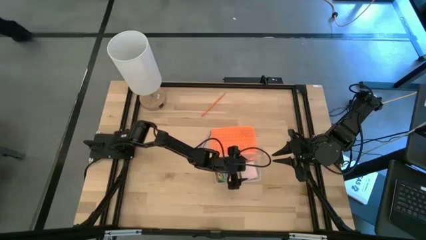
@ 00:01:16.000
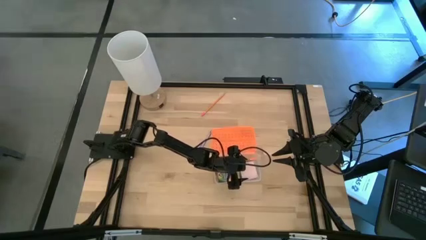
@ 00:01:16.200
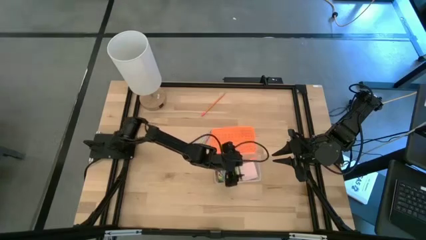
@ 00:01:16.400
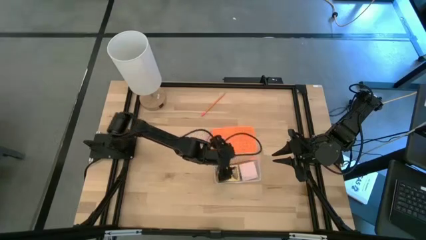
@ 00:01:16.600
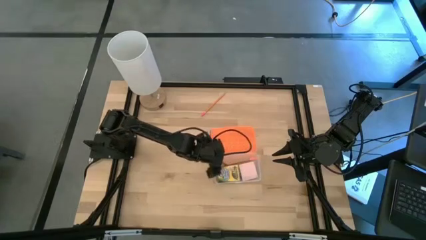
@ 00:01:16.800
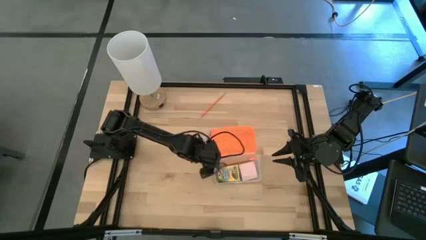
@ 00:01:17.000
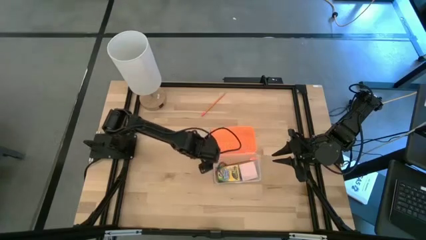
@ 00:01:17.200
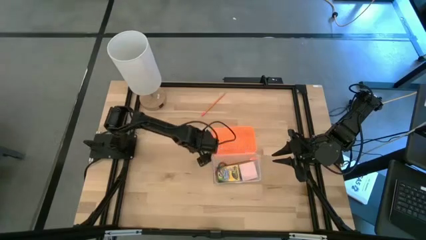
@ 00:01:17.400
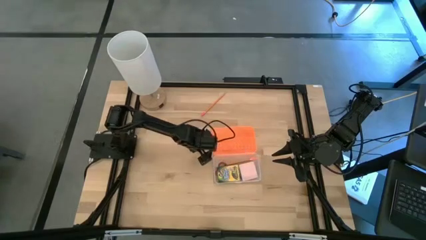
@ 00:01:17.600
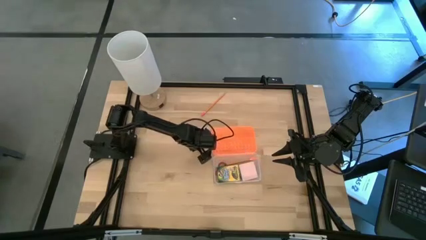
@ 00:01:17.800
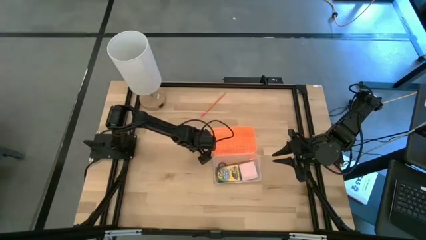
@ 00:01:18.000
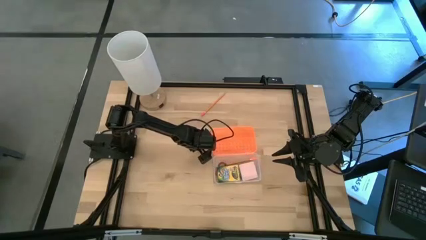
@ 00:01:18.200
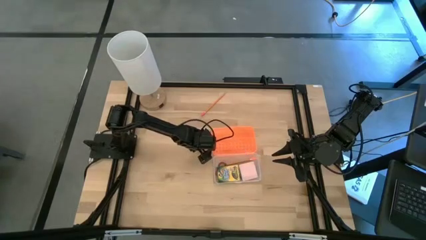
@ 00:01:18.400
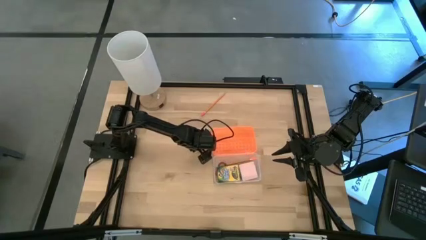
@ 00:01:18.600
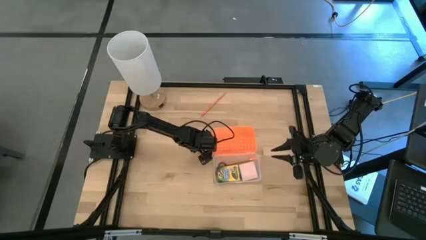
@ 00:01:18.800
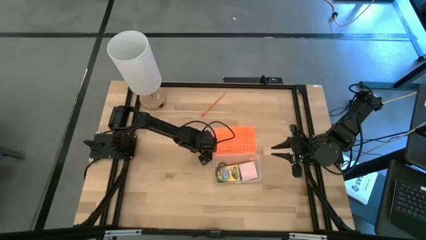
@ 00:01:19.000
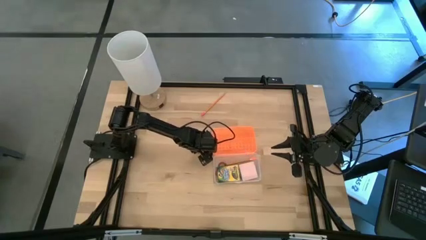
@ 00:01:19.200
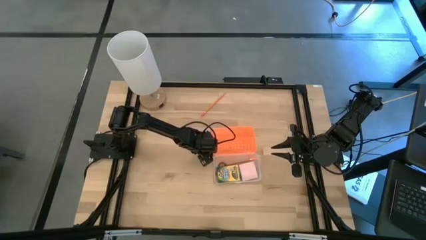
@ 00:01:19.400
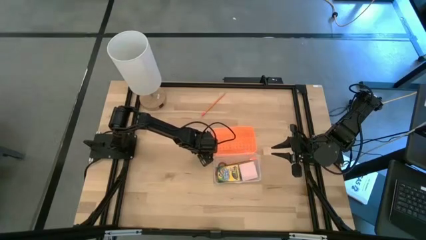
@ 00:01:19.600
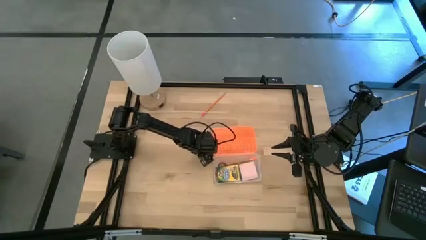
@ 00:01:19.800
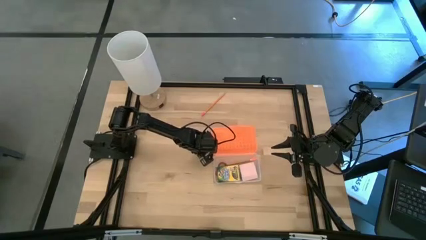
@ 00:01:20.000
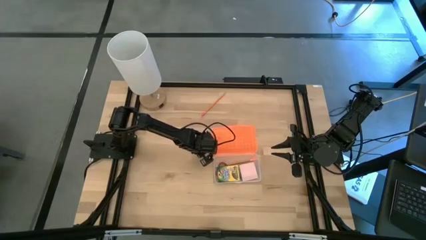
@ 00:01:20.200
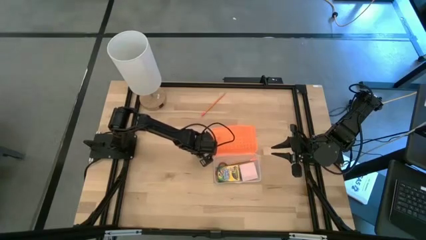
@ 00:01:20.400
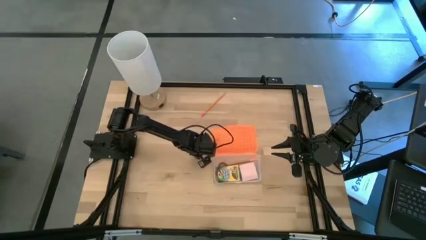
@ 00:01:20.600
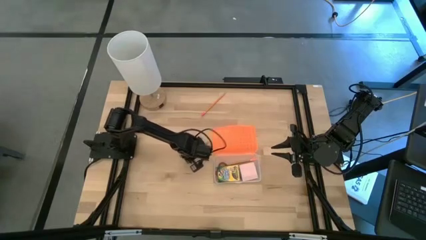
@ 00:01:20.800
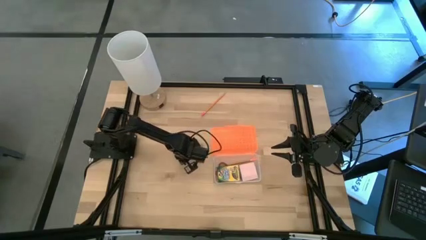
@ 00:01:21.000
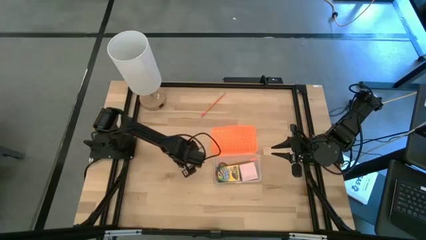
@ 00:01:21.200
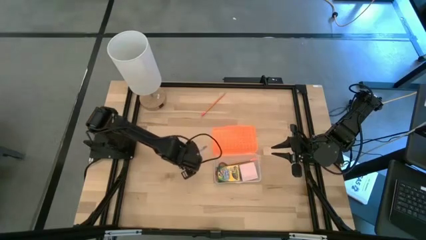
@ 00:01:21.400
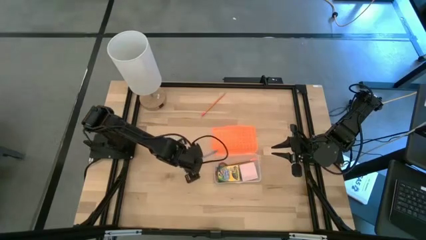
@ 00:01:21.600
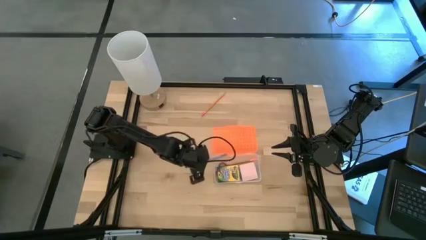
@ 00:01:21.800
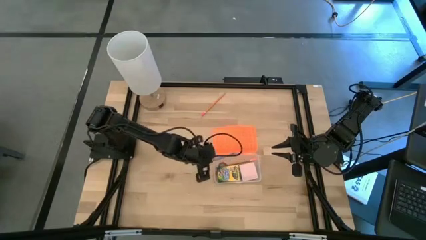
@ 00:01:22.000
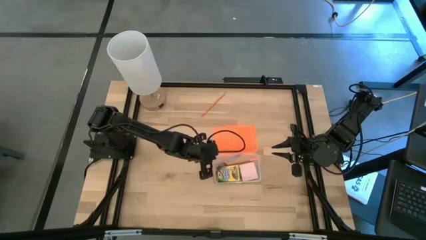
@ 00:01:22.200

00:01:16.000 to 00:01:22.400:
Task: Pack school essentials
Put the purple pen into the orange supply box

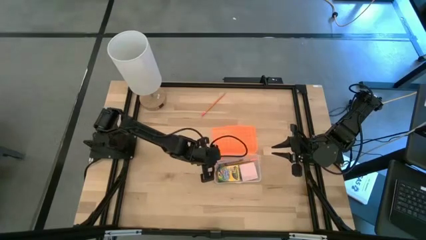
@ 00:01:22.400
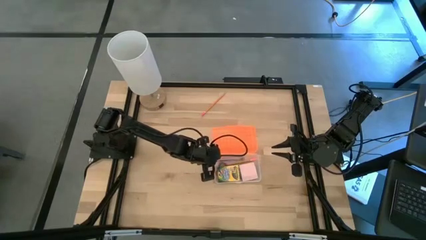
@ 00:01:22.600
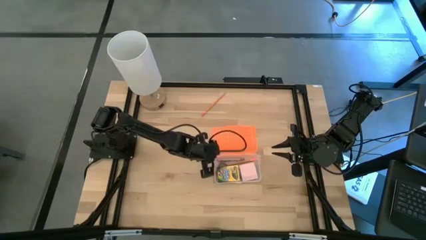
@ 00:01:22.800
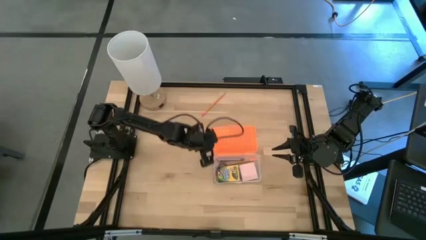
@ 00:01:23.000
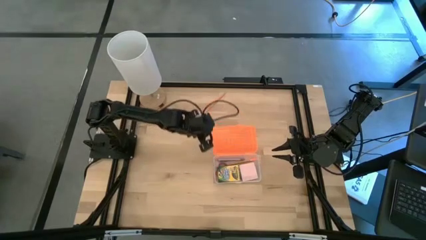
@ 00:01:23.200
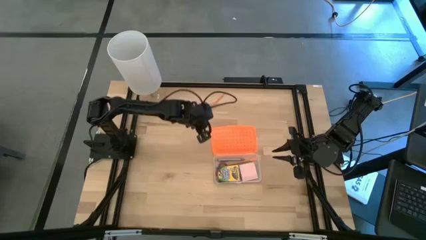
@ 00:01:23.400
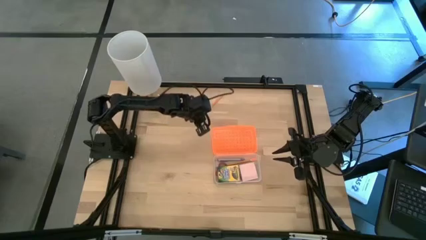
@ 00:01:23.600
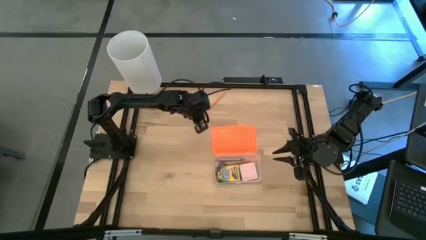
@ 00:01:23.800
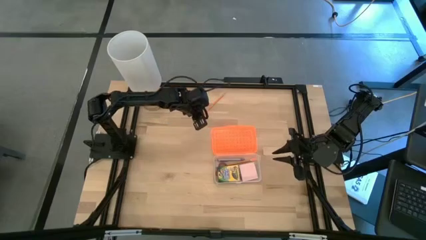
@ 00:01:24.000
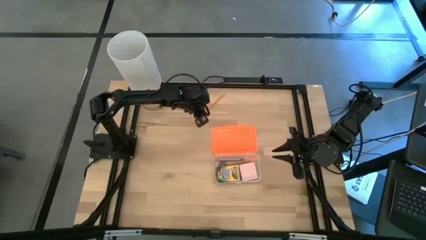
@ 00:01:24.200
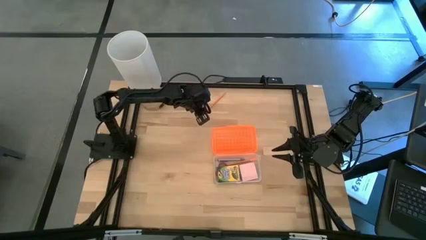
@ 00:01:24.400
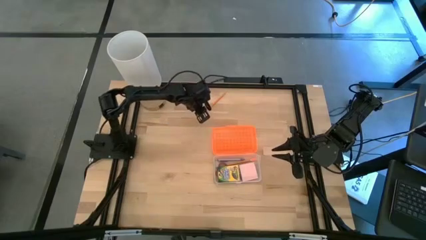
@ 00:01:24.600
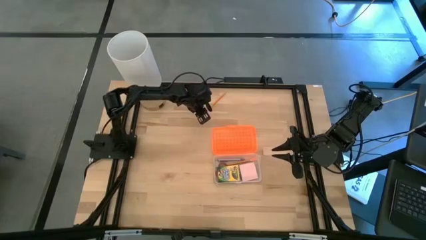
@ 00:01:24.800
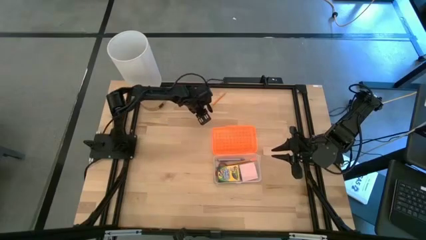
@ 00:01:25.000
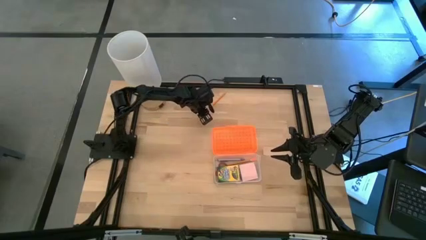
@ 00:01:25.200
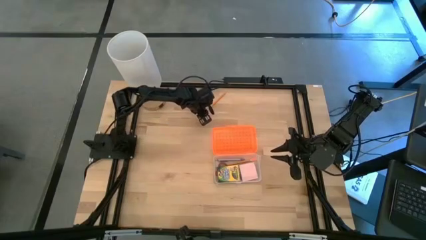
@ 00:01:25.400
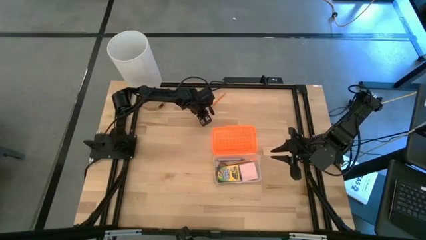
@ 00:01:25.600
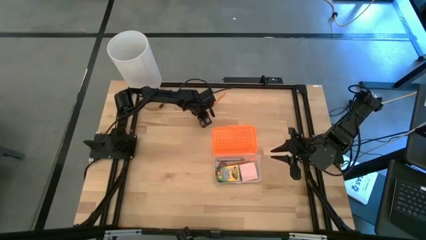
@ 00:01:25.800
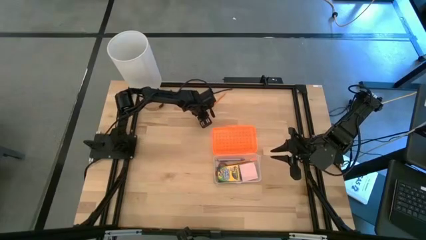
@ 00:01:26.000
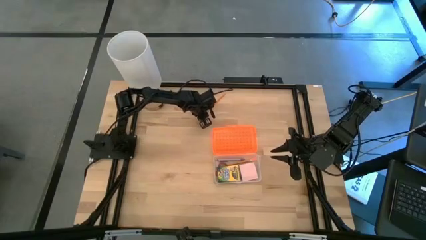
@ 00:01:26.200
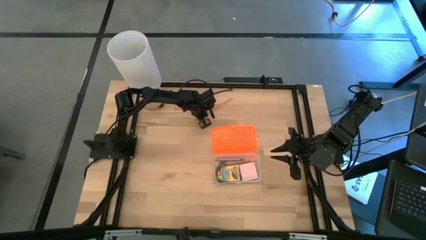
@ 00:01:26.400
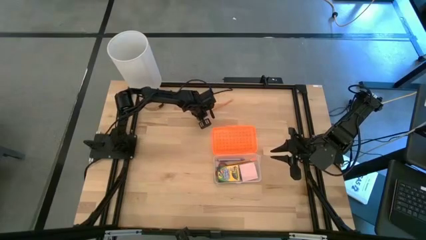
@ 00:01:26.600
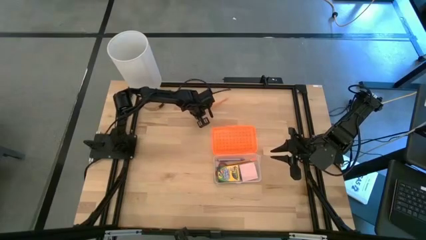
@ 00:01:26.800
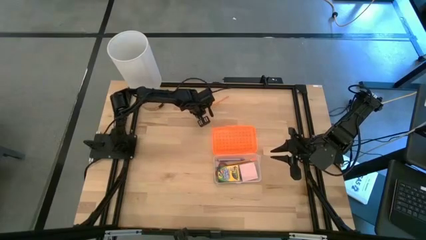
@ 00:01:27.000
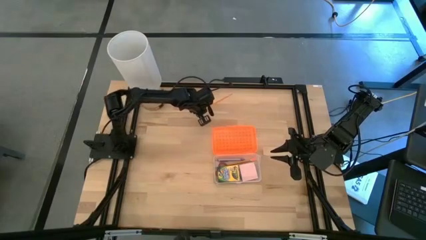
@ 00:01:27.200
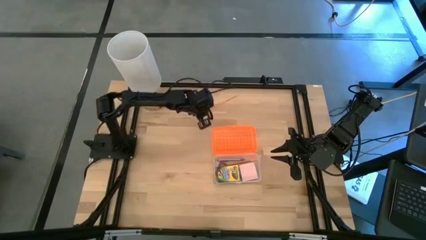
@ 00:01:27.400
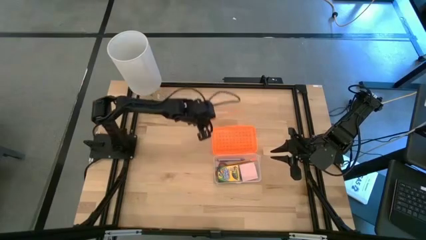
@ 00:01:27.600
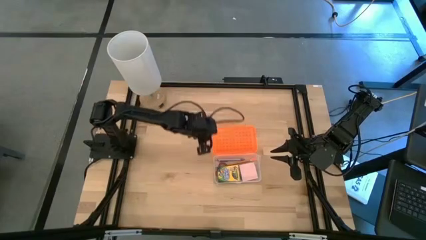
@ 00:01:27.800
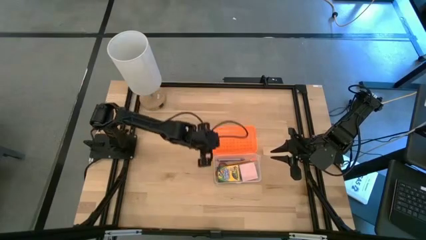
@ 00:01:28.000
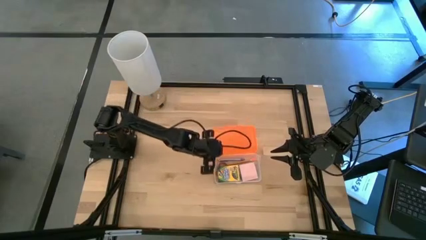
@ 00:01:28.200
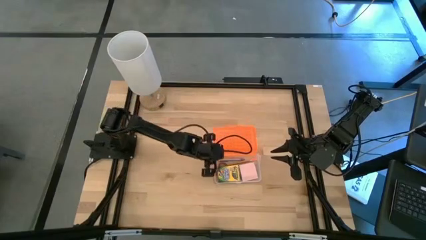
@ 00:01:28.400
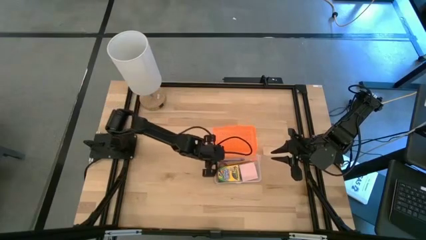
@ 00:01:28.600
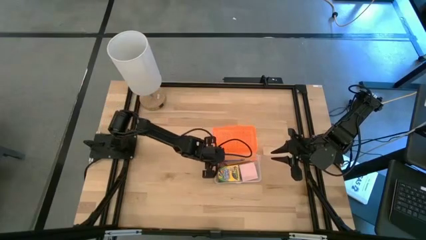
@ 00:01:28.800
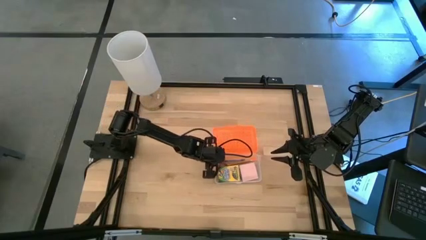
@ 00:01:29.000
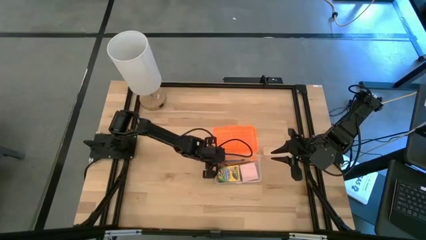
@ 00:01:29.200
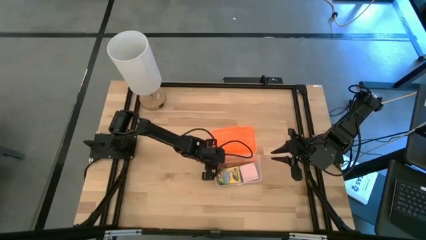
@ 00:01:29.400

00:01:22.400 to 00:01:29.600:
Put the yellow pencil into the orange supply box

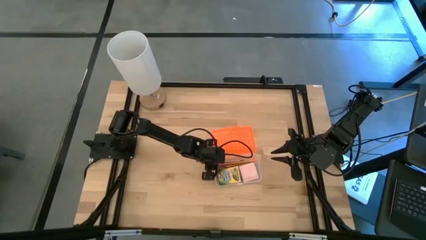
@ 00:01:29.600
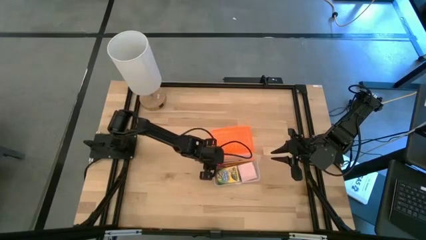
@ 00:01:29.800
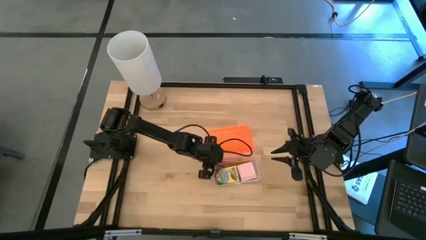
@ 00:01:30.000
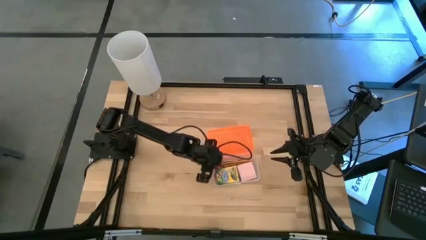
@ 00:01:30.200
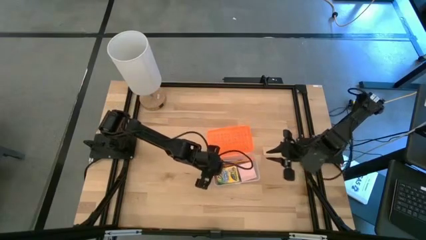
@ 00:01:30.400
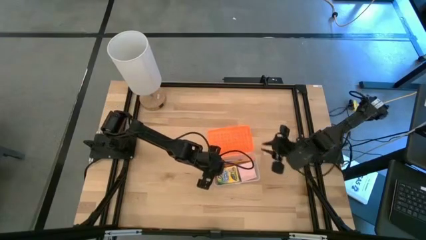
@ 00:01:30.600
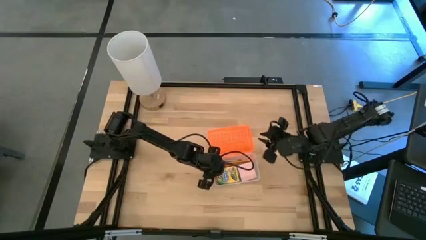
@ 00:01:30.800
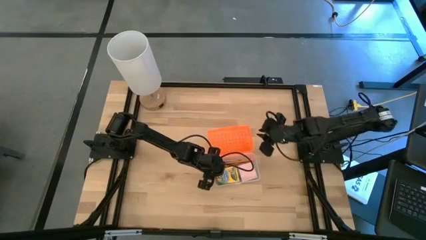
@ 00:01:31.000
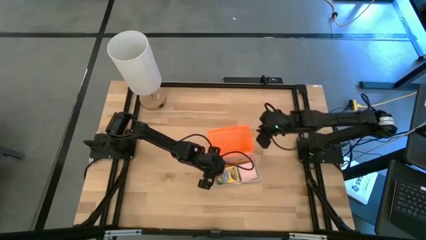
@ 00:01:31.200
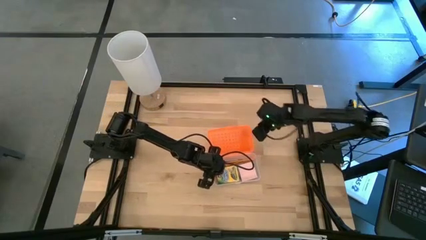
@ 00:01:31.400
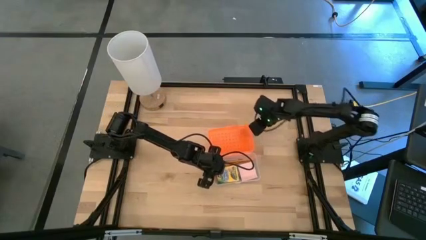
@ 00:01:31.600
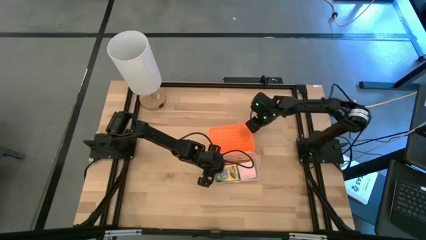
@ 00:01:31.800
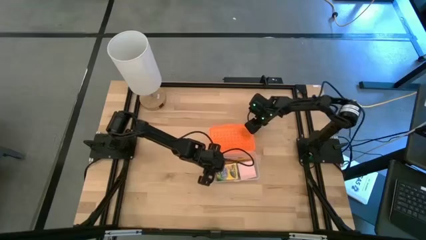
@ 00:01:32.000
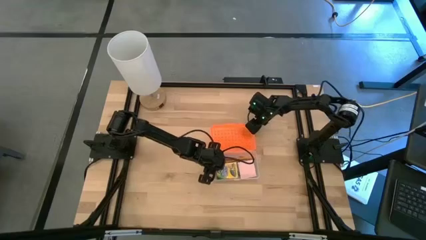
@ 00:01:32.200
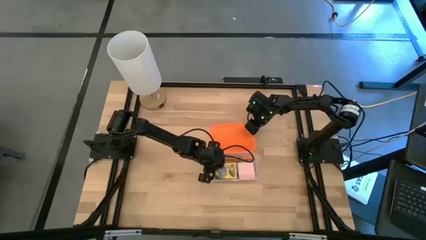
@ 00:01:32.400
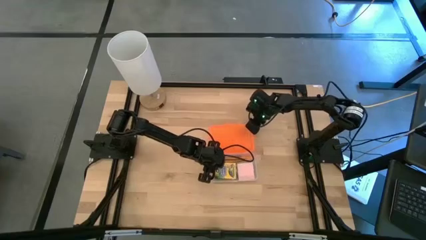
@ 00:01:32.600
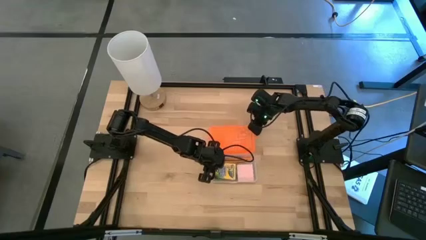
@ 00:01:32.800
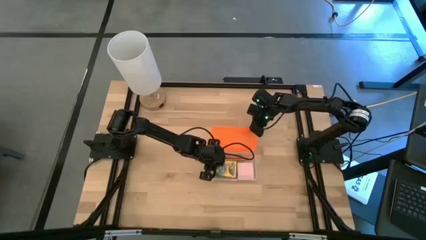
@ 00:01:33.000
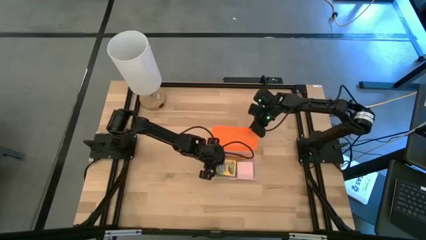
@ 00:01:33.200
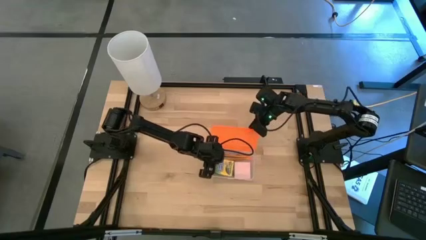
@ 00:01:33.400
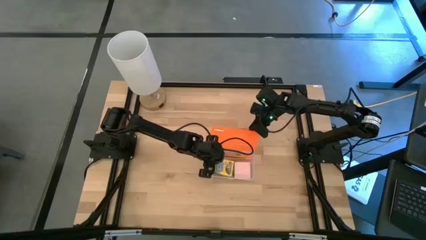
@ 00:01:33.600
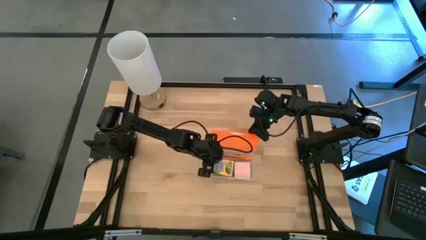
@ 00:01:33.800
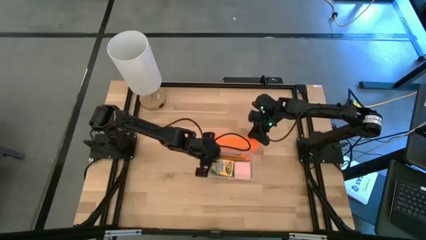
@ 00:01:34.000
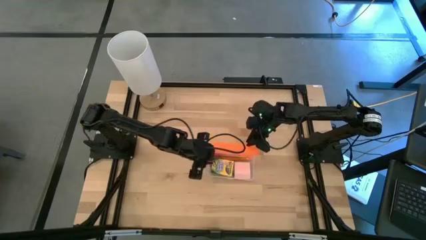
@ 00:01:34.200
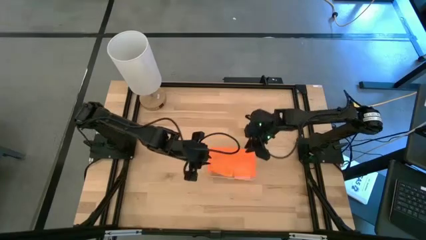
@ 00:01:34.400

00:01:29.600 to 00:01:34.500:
Close the orange supply box
